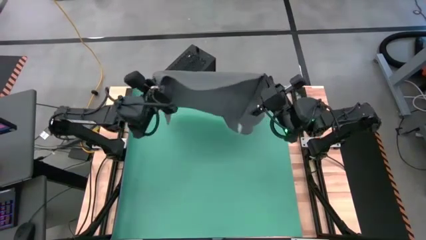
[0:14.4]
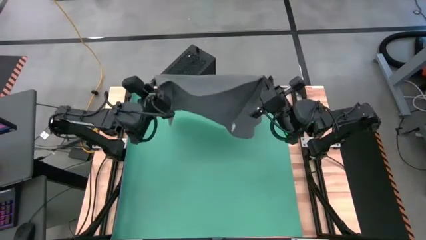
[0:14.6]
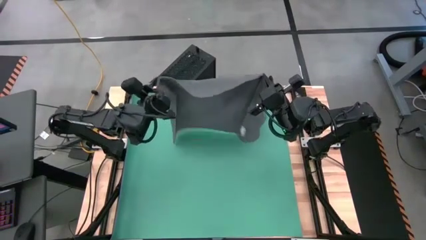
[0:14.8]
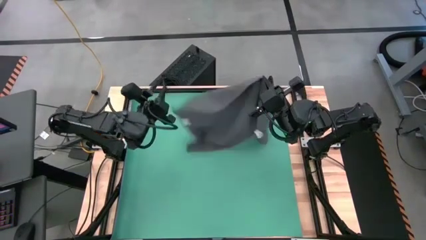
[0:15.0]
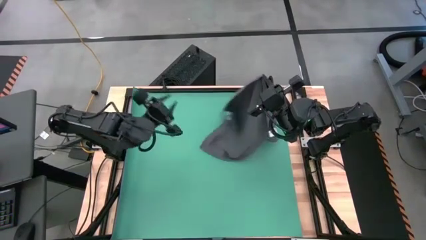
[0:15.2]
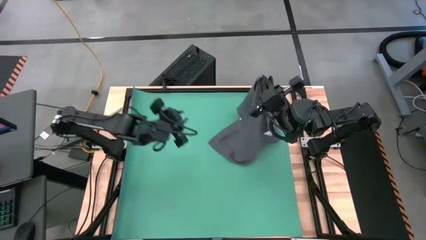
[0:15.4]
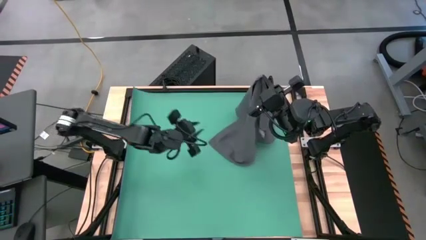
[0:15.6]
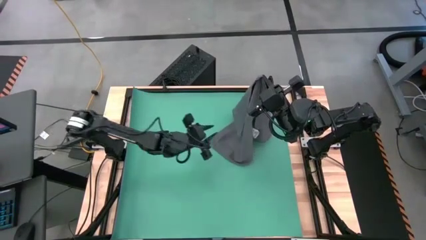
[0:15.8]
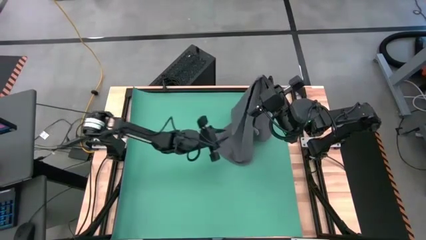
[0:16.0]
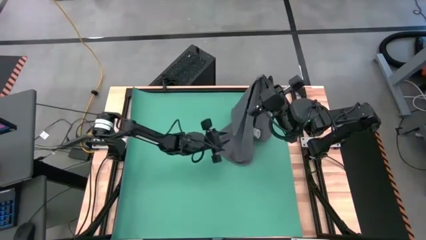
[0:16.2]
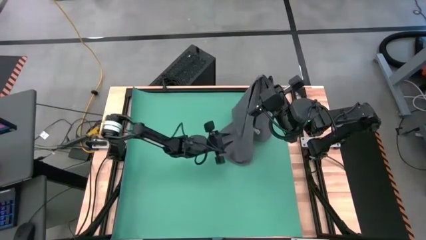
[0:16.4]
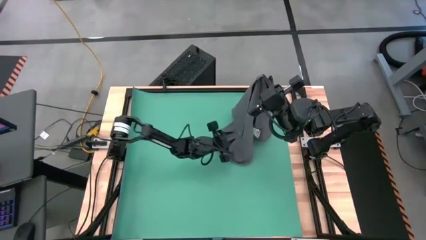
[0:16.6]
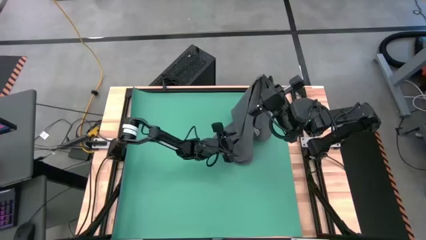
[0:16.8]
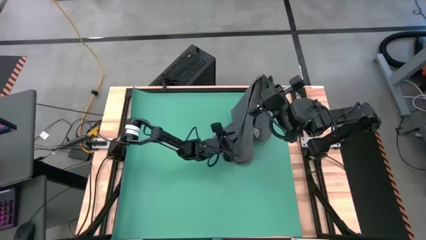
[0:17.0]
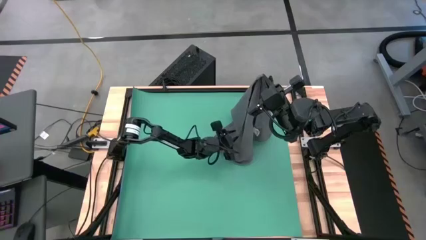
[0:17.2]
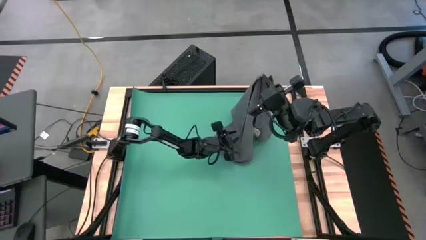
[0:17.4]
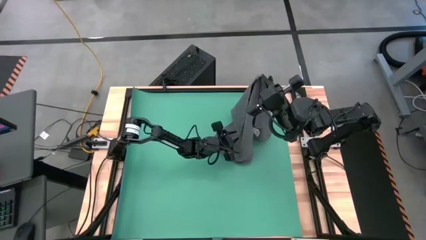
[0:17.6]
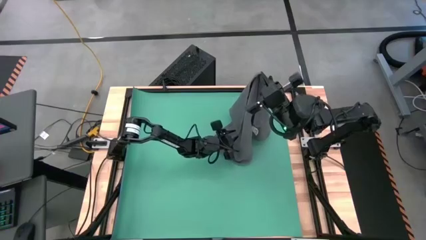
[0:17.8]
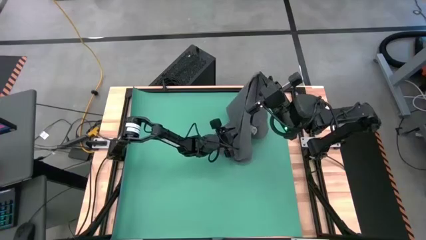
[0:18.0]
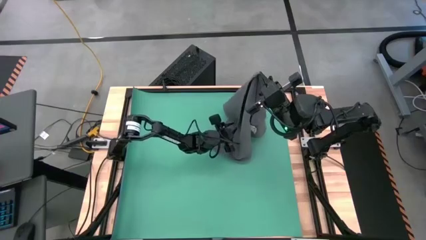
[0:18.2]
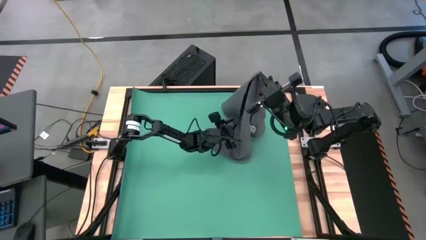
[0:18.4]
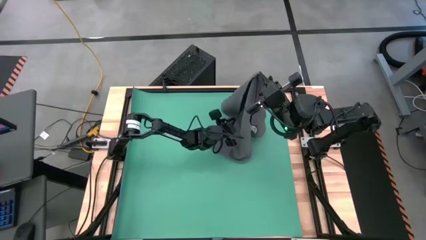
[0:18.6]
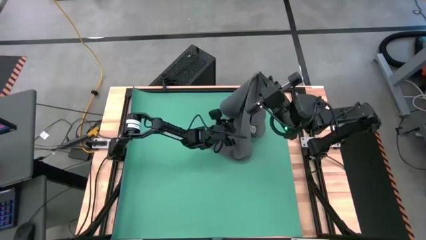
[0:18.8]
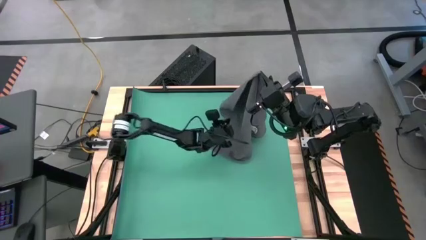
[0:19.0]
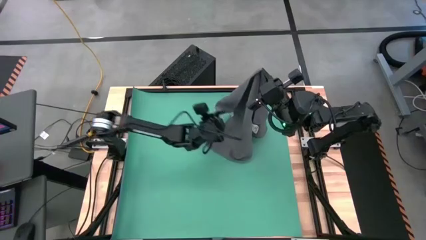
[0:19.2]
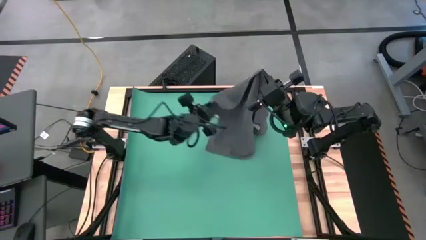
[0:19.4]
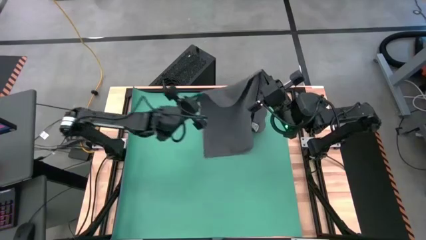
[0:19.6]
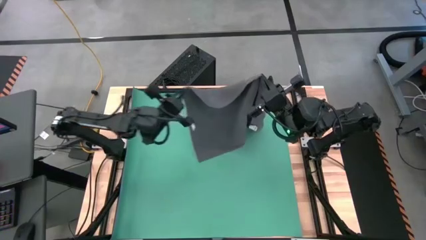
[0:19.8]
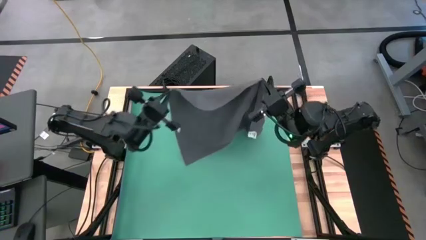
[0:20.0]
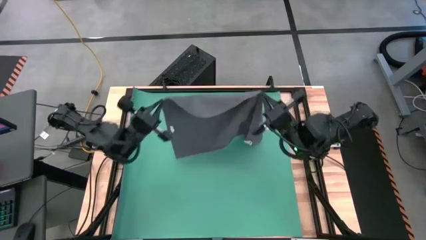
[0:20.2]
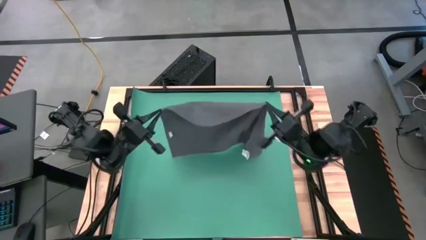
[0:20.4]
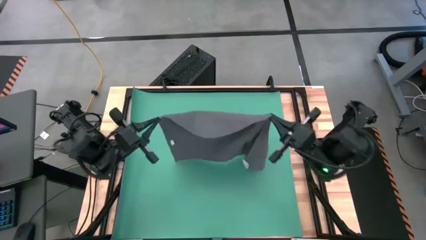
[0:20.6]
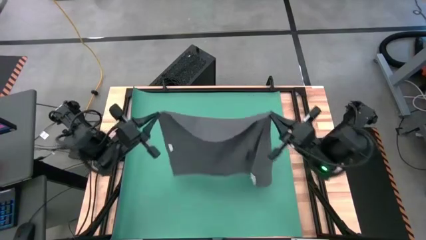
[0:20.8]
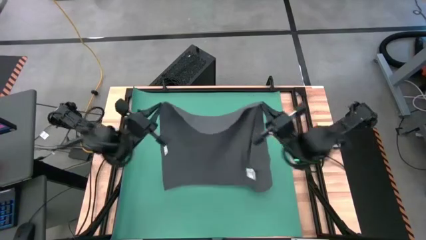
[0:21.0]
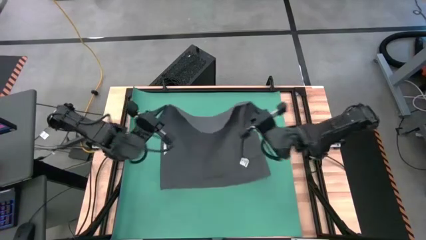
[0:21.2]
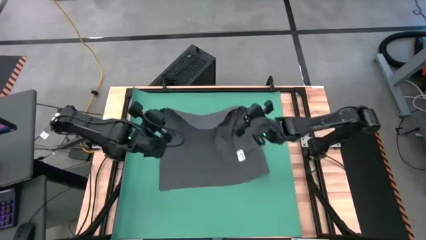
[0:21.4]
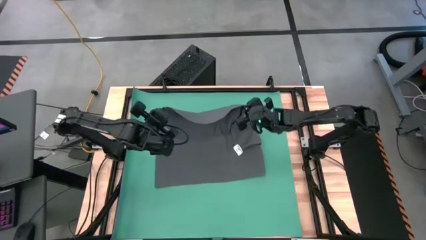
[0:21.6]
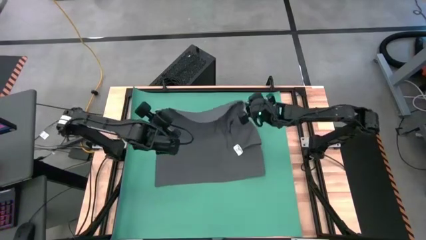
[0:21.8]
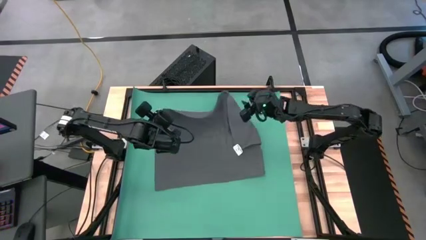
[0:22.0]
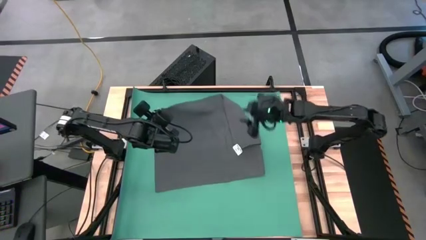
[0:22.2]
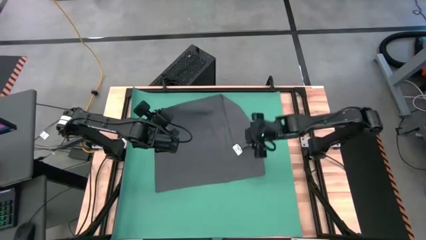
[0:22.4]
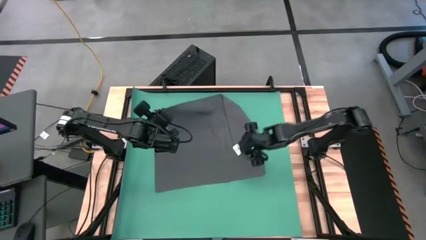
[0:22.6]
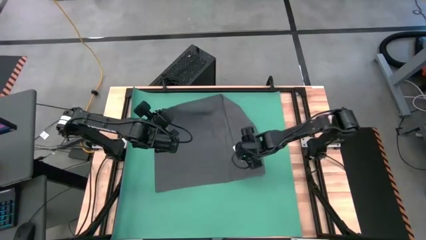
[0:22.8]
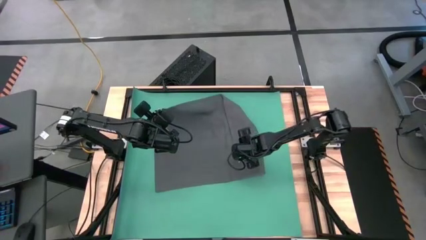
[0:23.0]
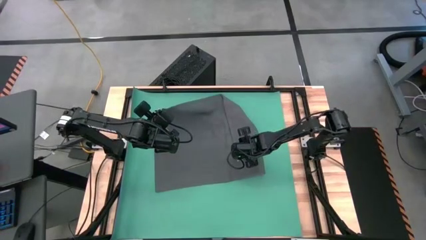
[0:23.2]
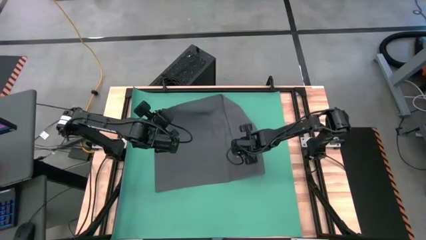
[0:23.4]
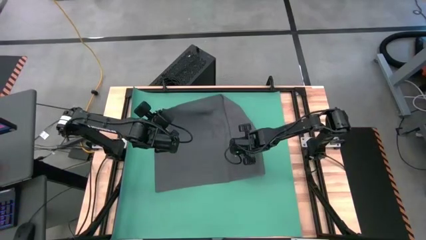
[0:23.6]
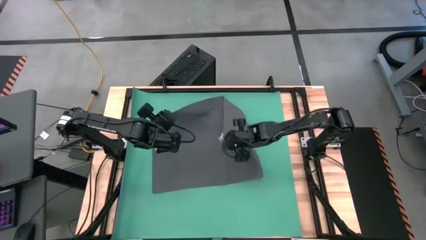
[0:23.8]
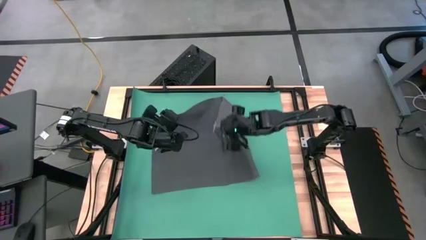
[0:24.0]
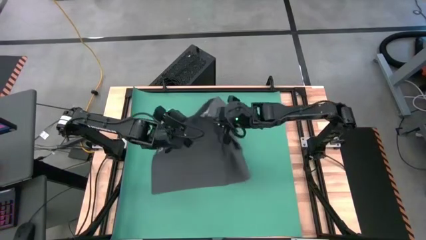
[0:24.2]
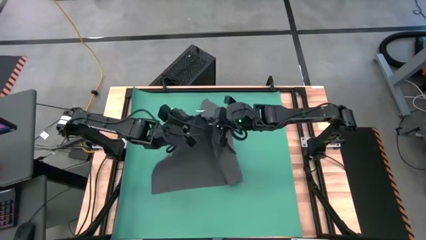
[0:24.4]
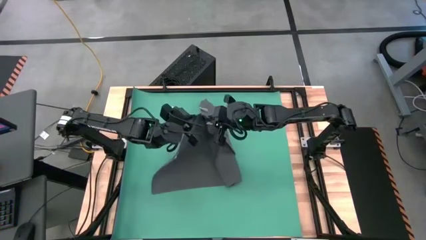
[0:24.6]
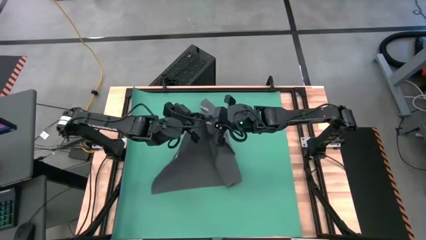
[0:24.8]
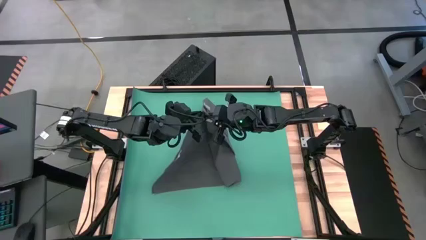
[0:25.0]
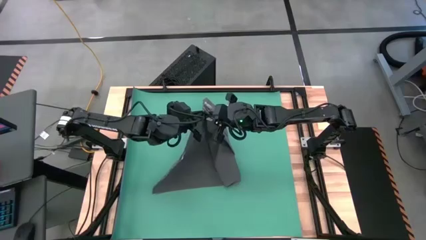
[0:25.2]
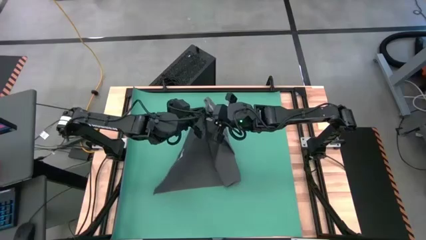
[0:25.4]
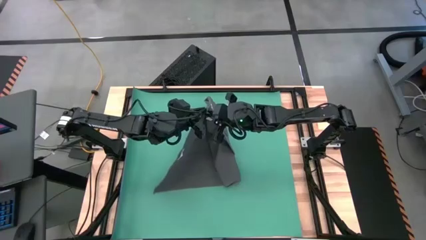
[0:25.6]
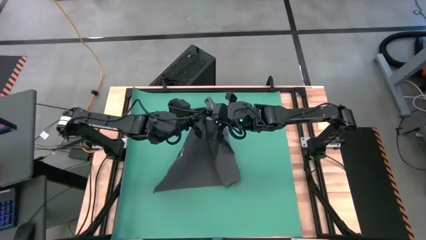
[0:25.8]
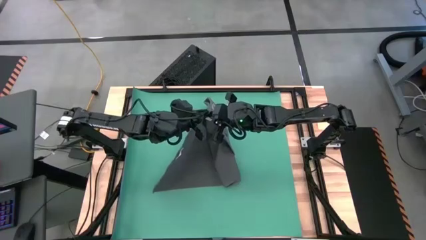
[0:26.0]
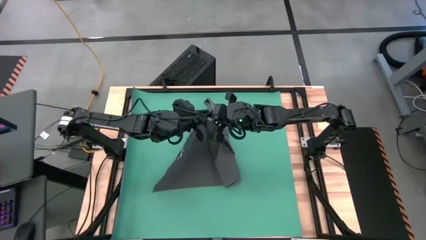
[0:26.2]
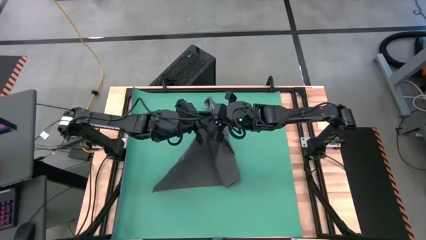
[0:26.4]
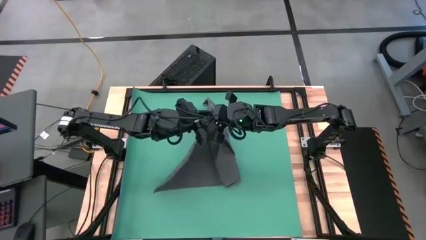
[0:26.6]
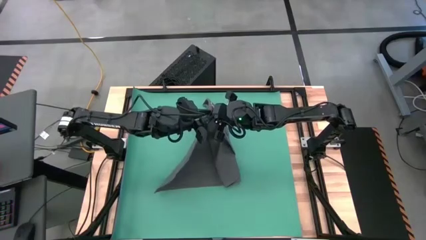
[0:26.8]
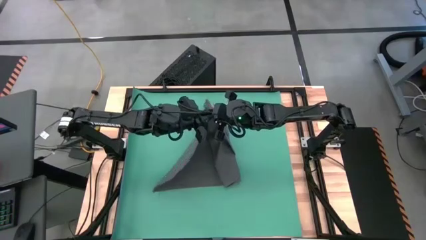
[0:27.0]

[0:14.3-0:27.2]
Task: Roll towel
Roll the gray towel
